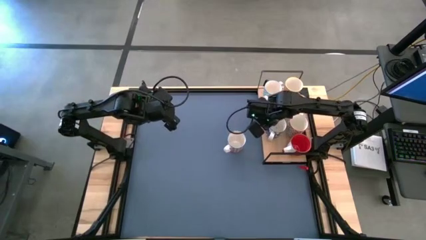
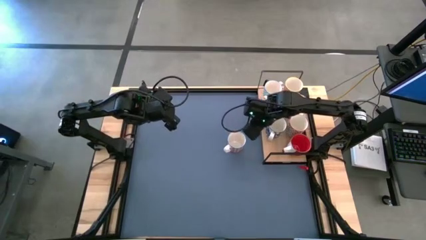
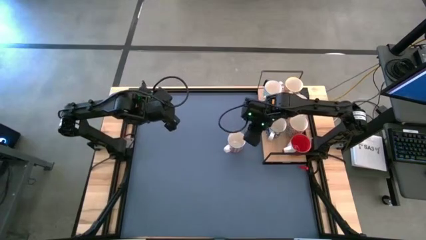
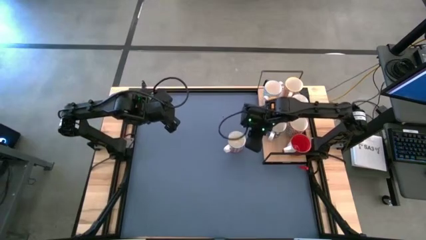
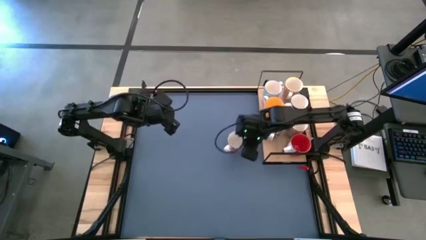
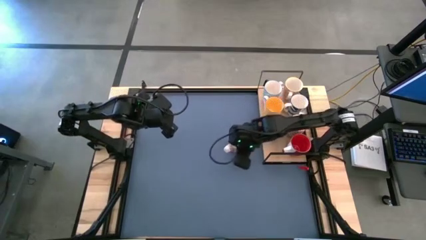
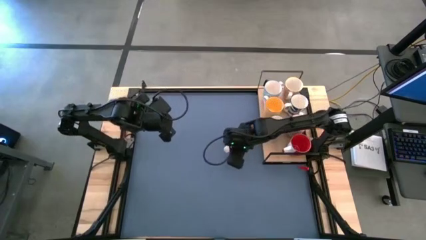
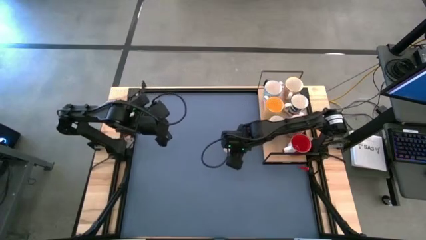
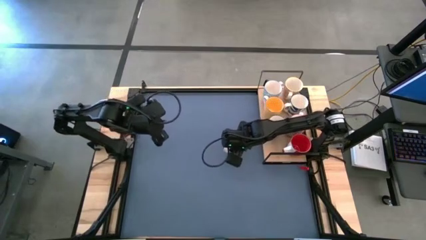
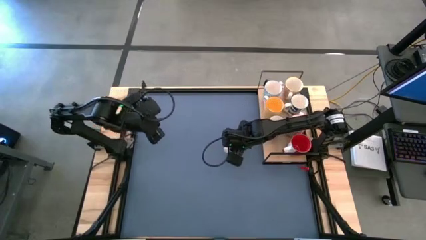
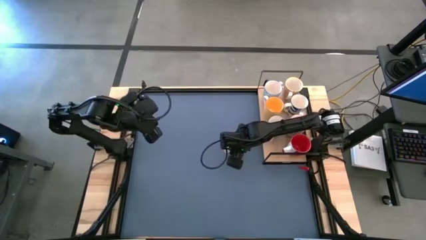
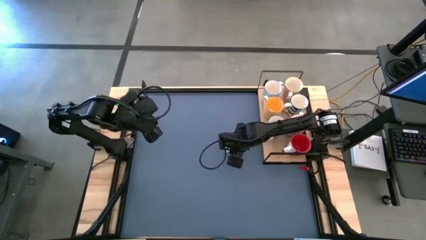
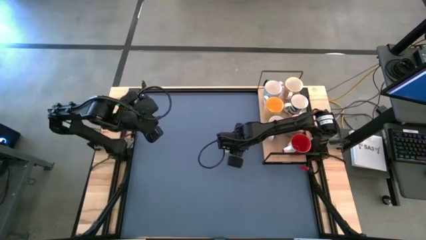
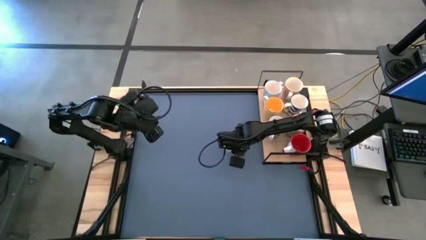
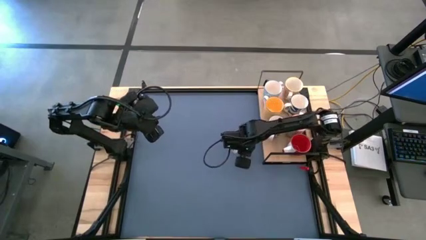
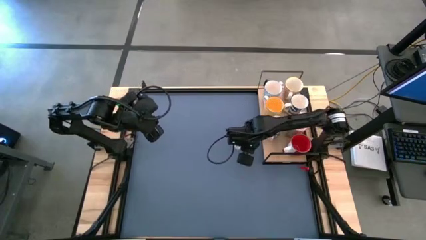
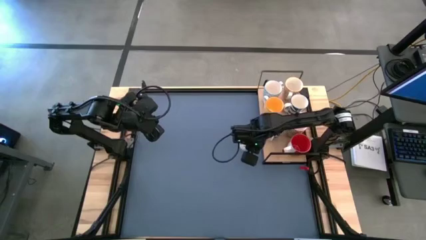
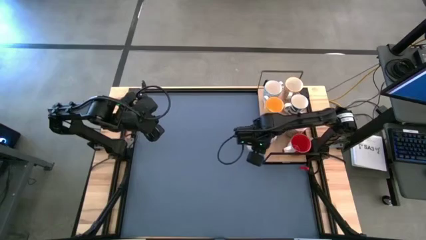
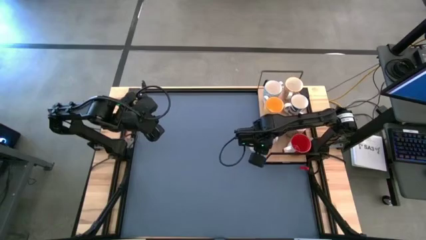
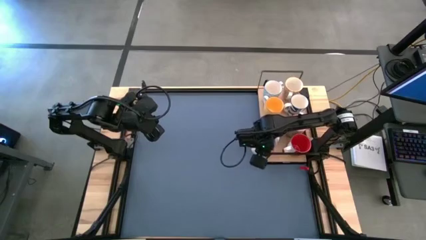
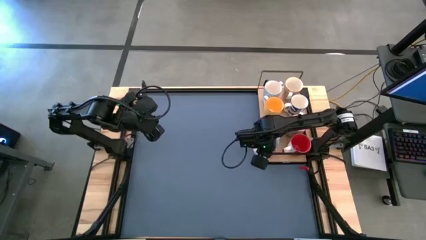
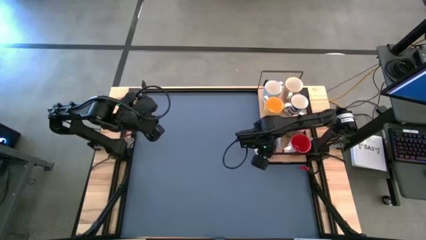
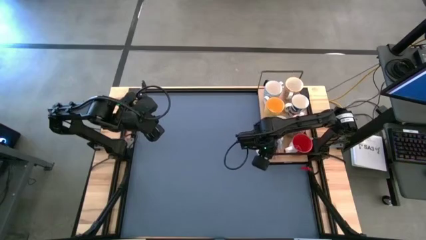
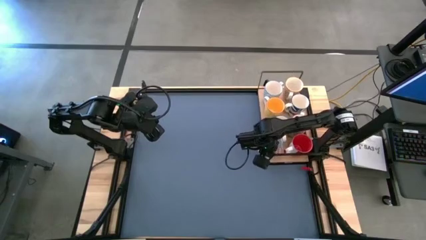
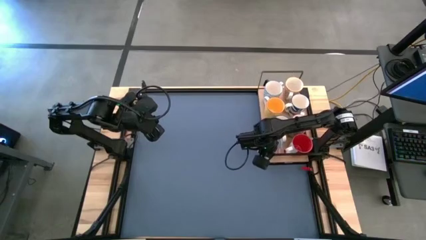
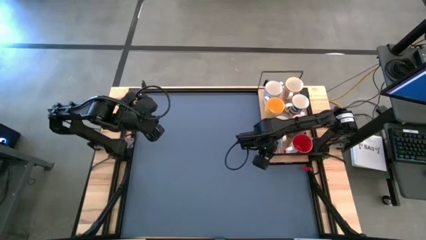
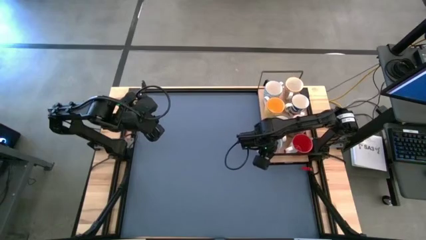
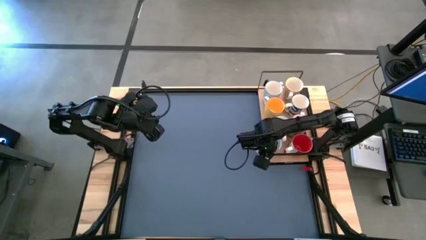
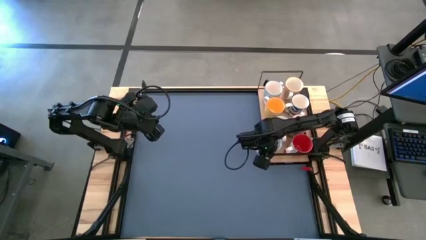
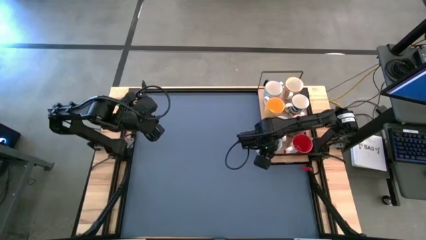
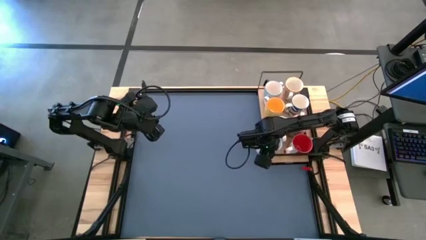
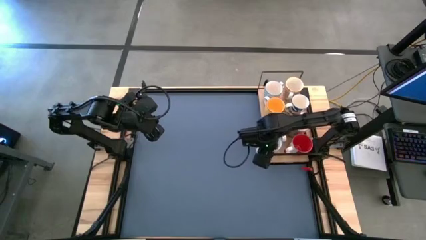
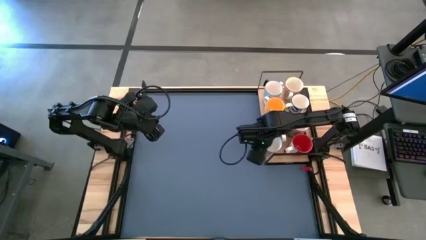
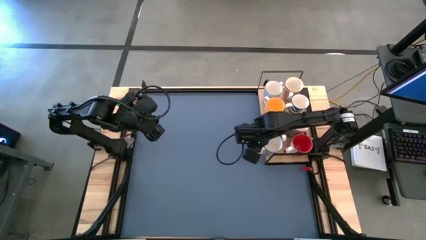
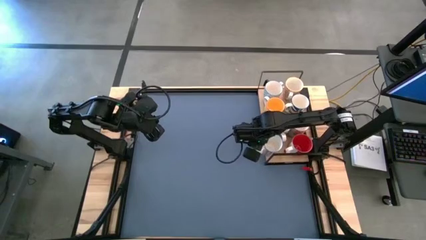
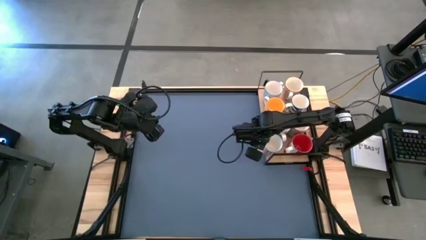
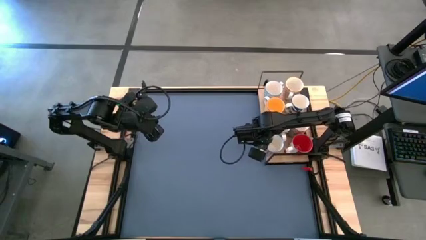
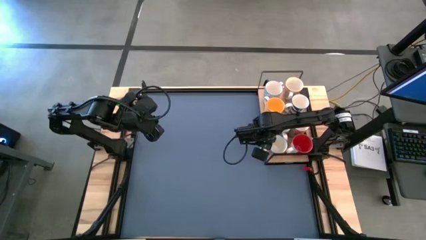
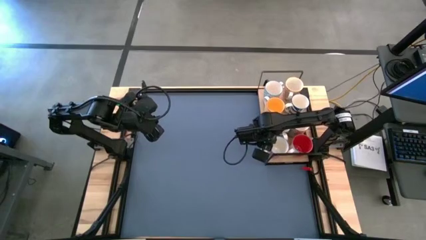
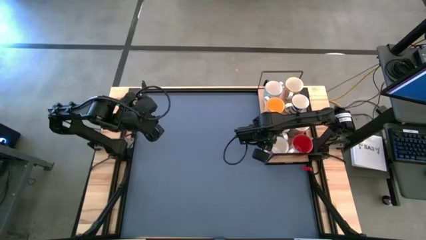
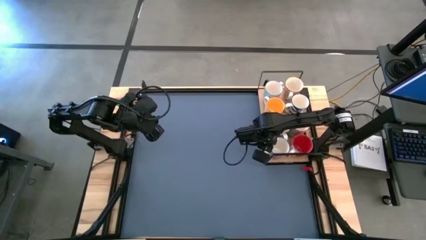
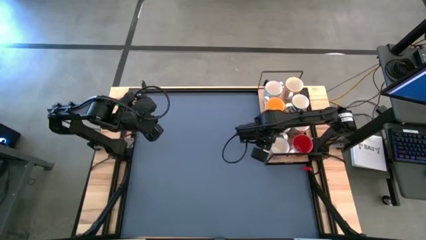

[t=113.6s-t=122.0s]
Task: Place coffee mugs
Put the red and white cup on the shelf aligned with the red cup

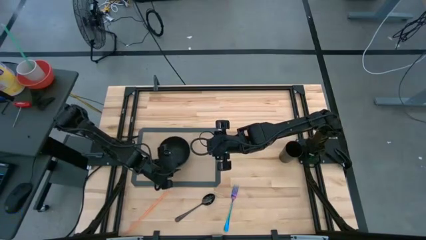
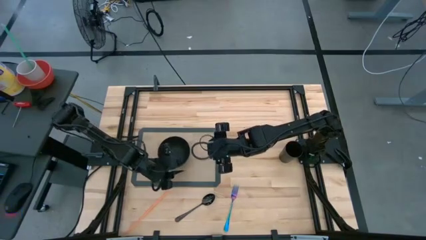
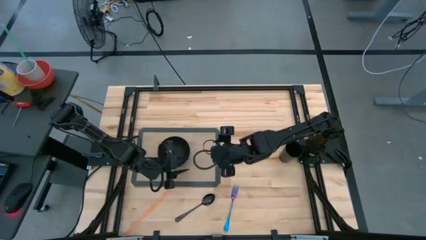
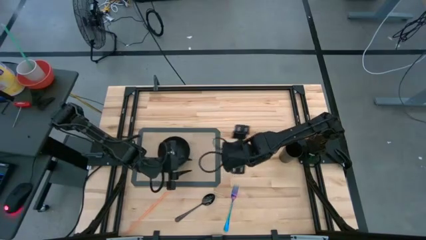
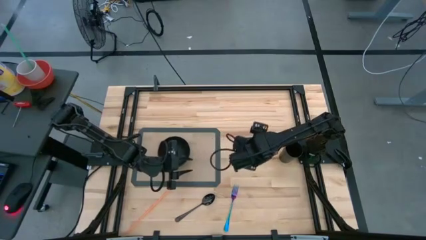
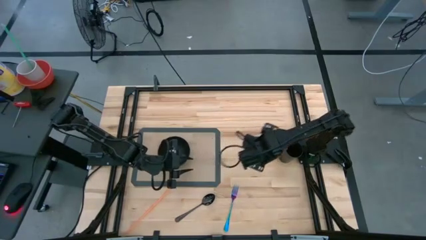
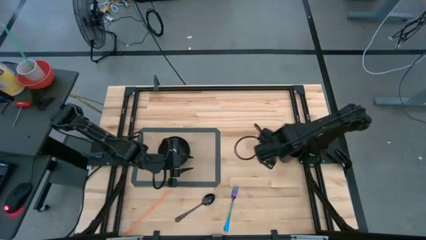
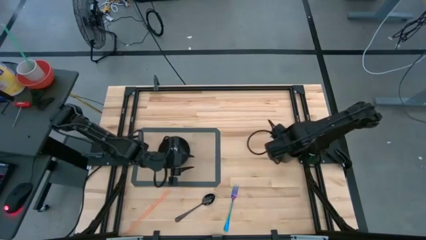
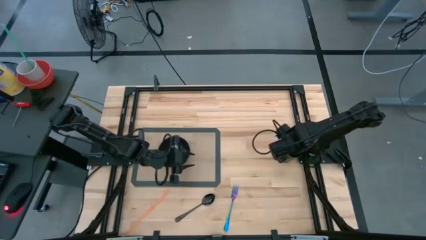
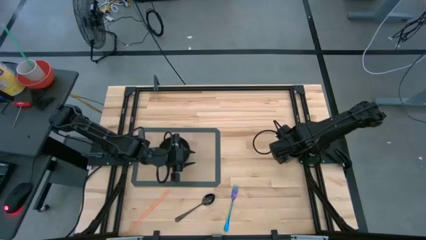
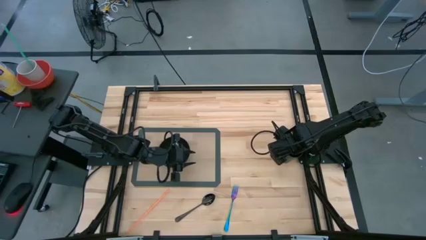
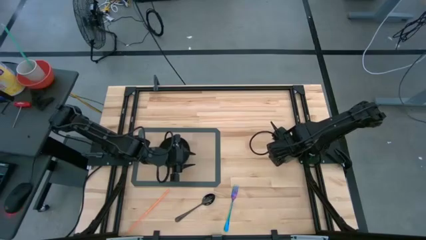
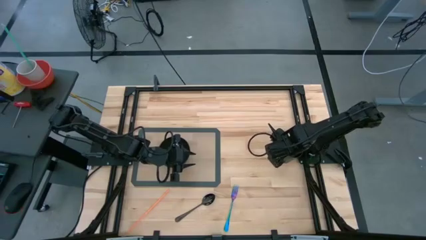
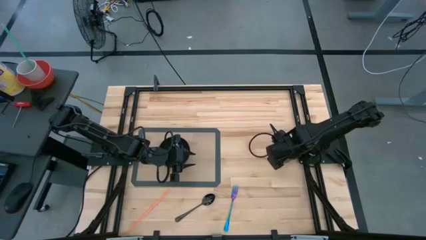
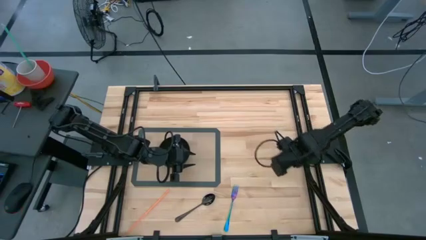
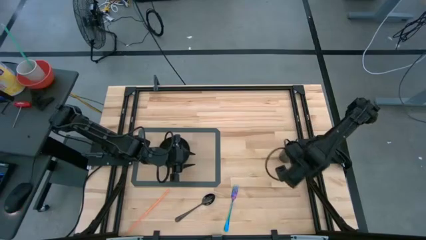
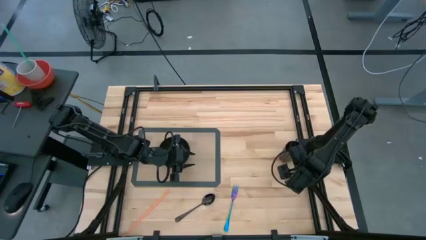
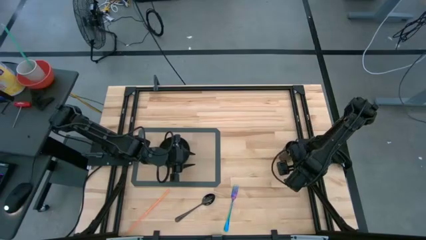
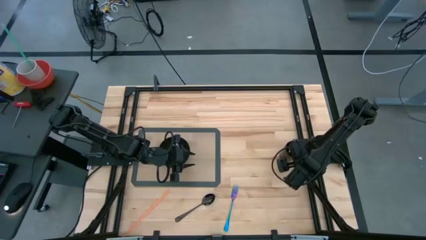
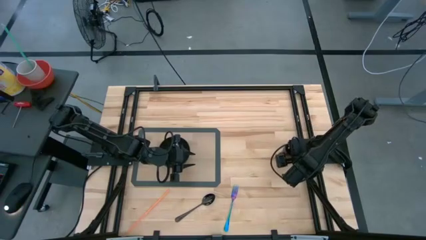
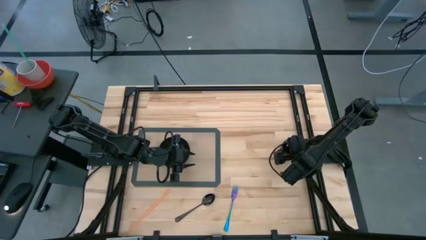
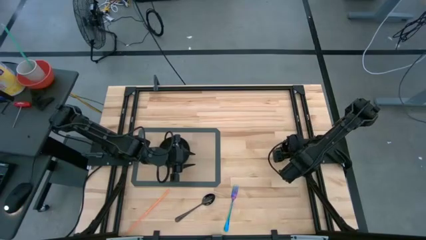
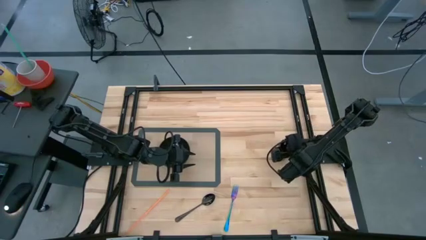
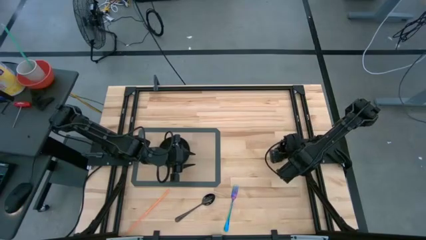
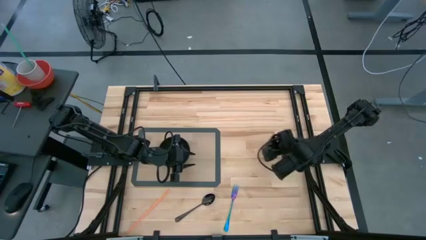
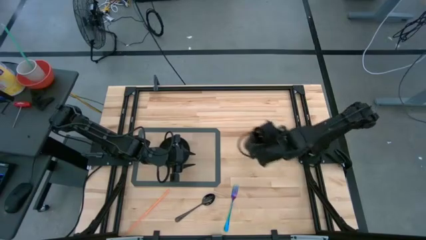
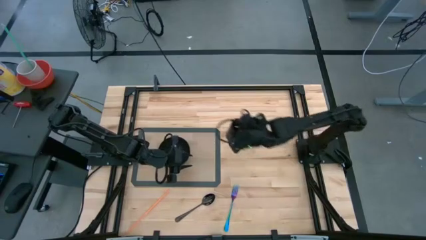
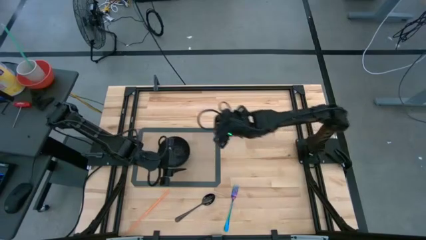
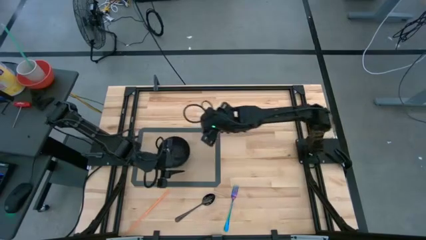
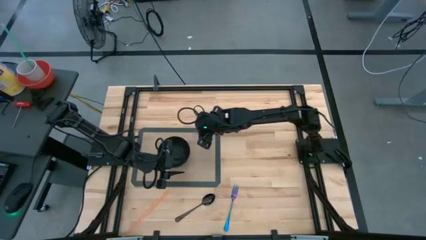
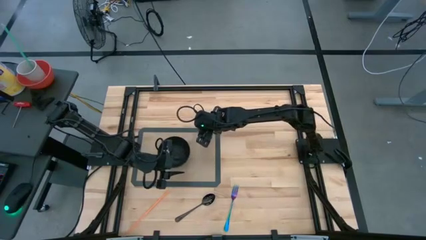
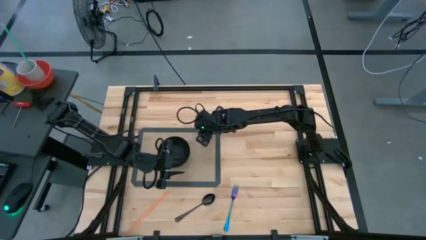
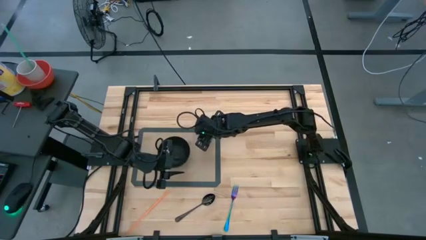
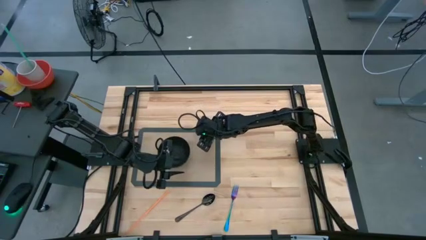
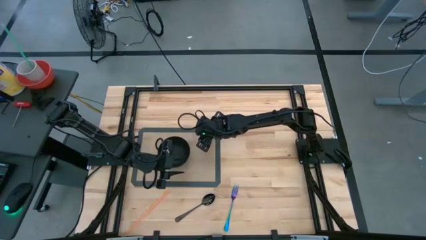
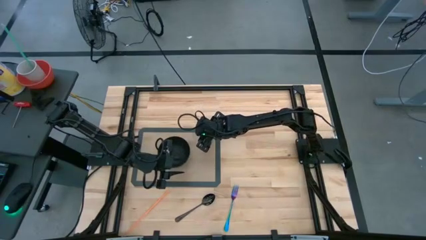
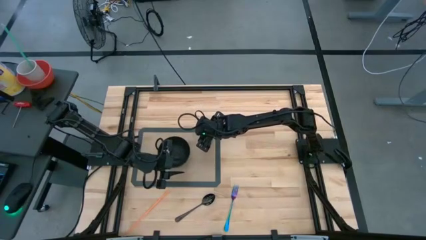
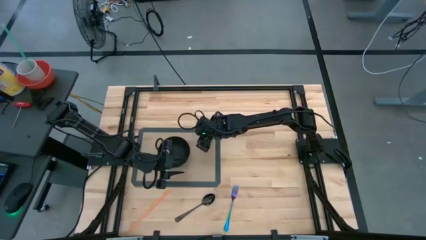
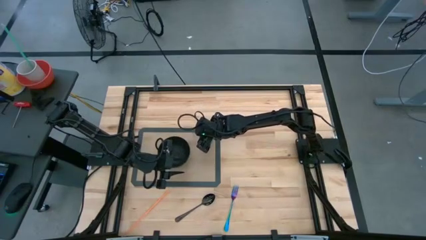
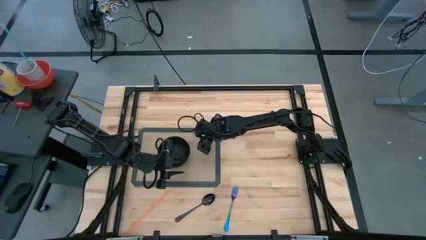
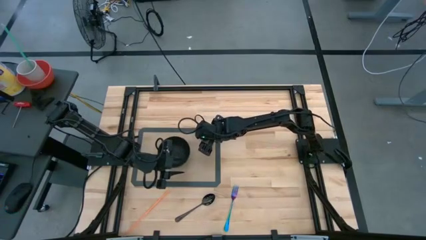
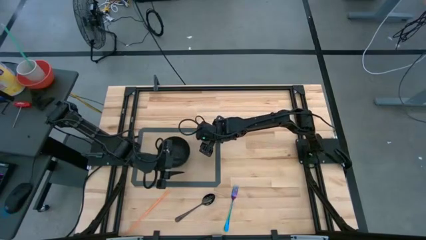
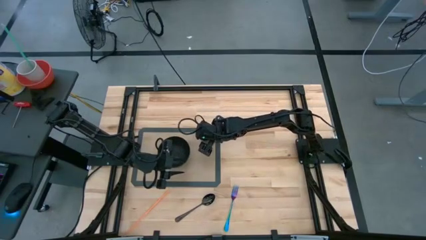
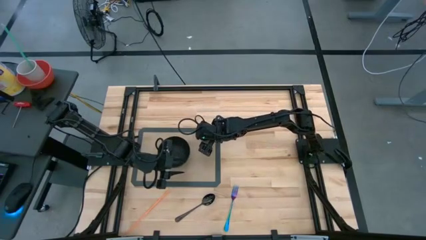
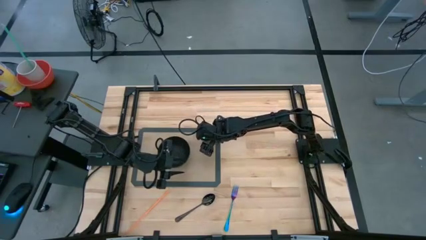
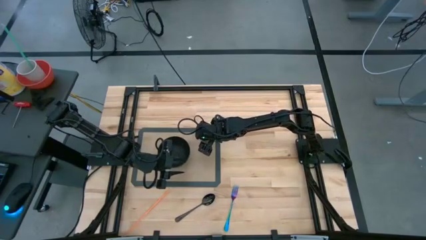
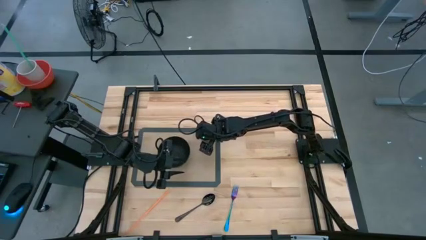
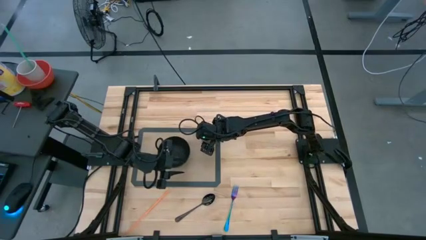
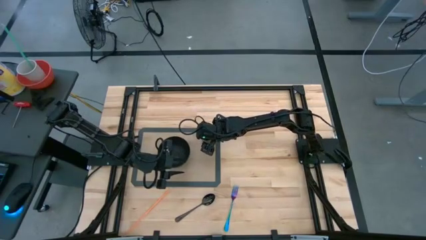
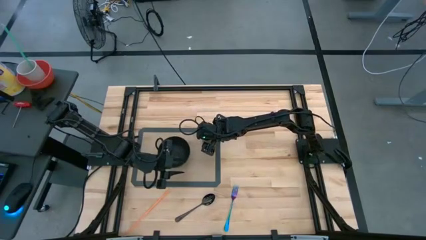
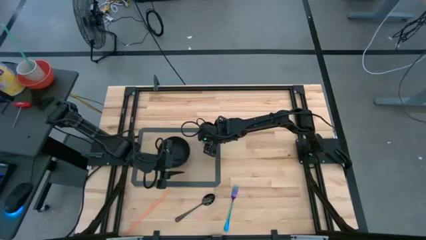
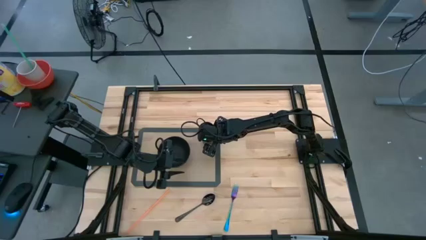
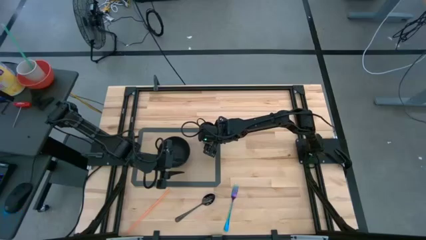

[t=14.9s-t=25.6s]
Task: Pick & Place Utensil
Put the black cup on the gray placemat to the top right of the black bowl
